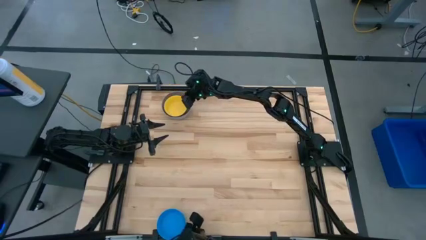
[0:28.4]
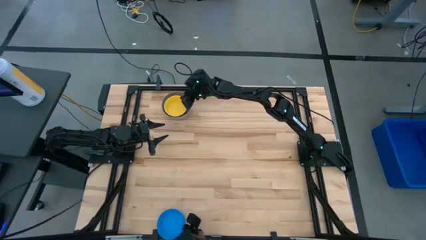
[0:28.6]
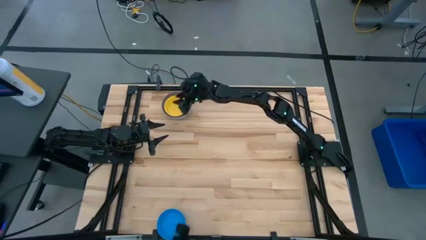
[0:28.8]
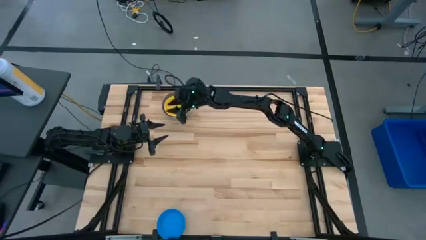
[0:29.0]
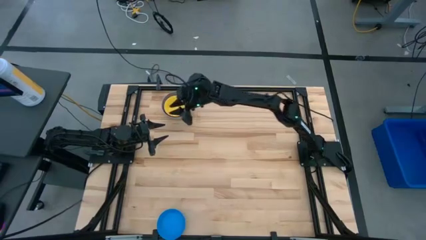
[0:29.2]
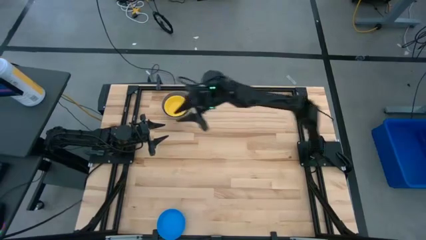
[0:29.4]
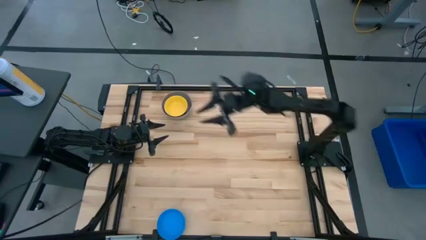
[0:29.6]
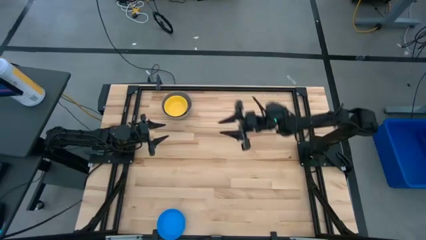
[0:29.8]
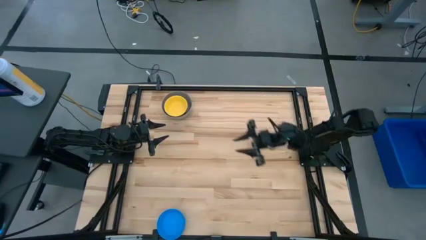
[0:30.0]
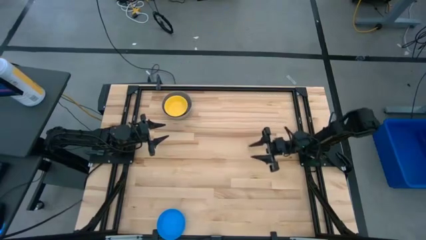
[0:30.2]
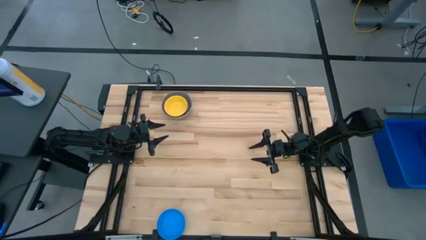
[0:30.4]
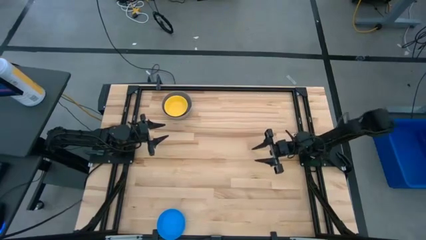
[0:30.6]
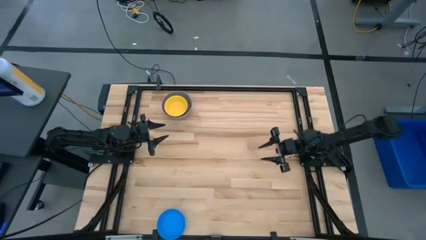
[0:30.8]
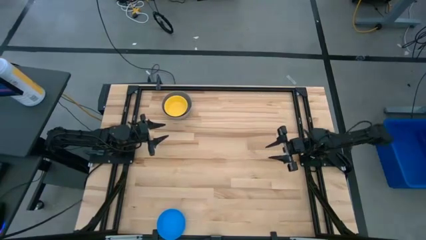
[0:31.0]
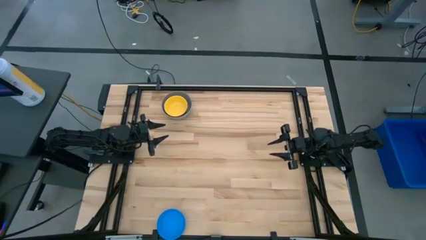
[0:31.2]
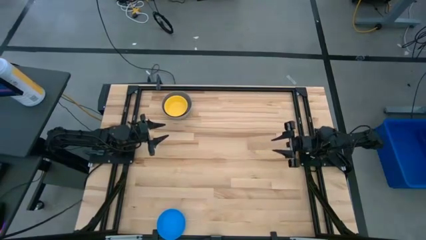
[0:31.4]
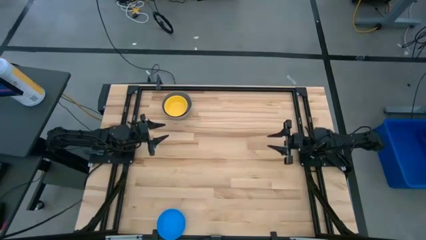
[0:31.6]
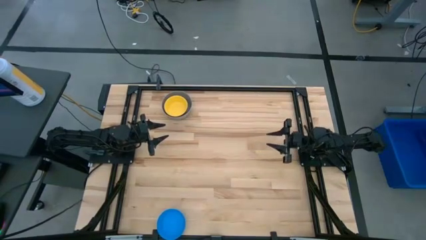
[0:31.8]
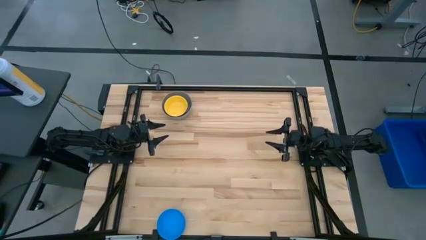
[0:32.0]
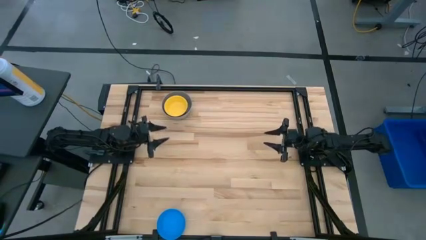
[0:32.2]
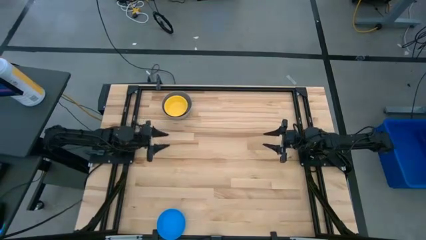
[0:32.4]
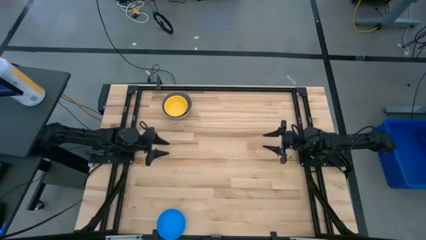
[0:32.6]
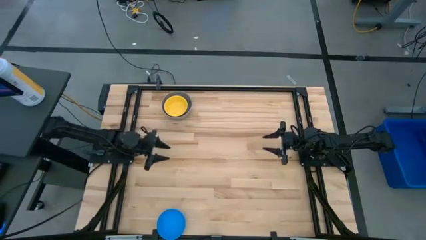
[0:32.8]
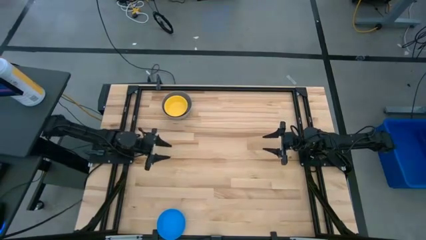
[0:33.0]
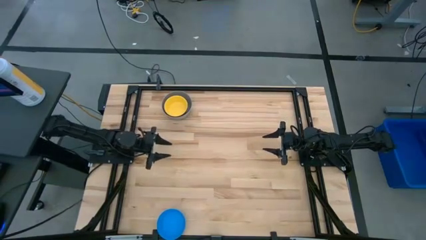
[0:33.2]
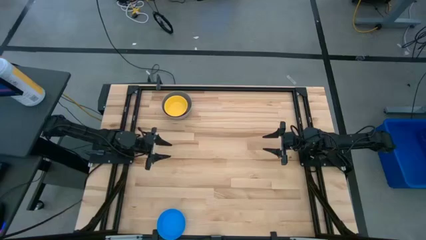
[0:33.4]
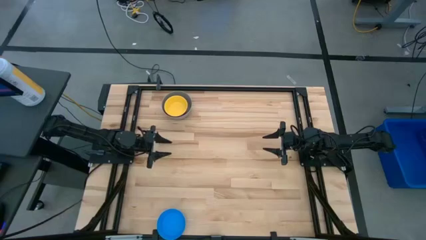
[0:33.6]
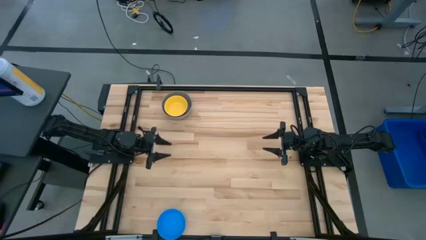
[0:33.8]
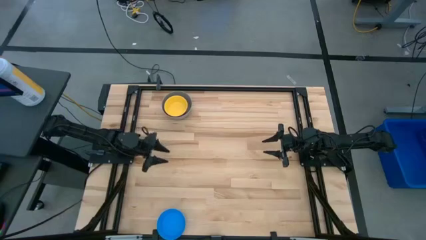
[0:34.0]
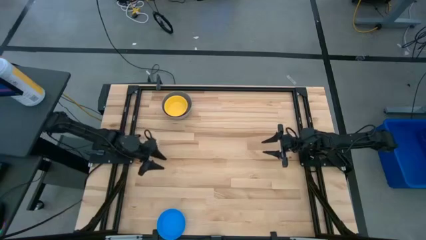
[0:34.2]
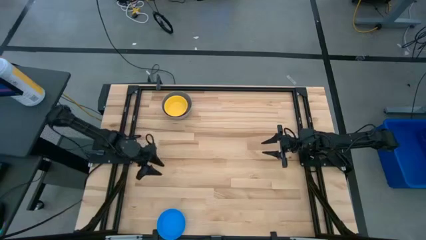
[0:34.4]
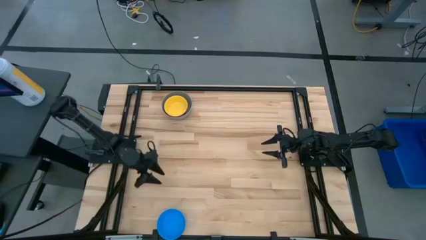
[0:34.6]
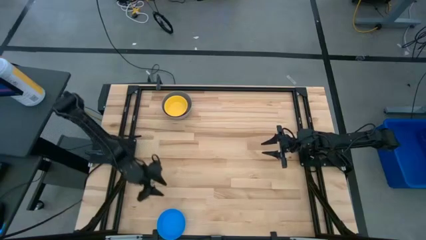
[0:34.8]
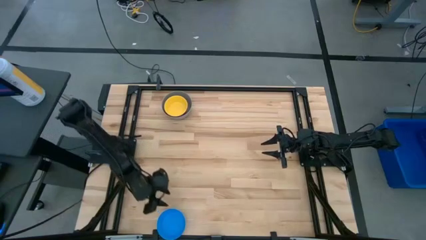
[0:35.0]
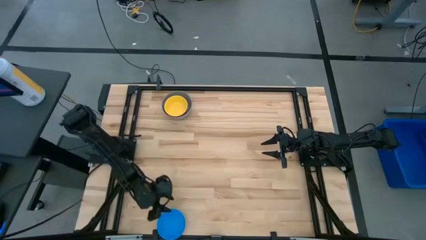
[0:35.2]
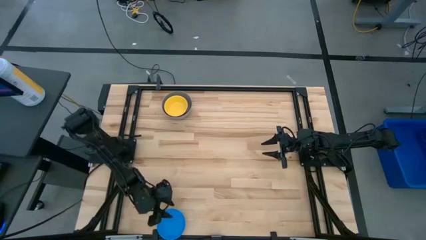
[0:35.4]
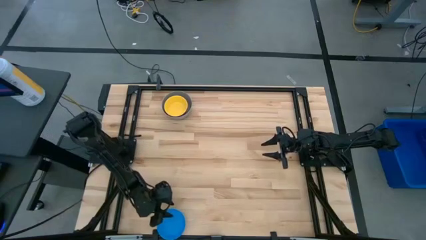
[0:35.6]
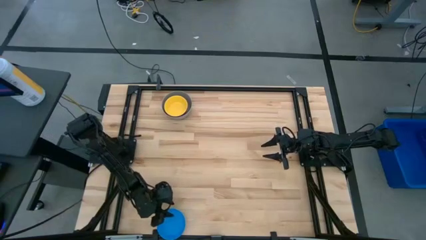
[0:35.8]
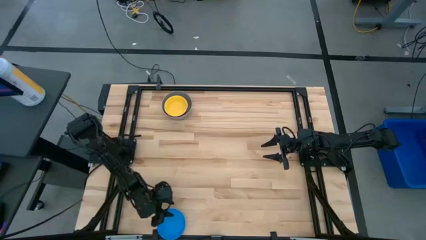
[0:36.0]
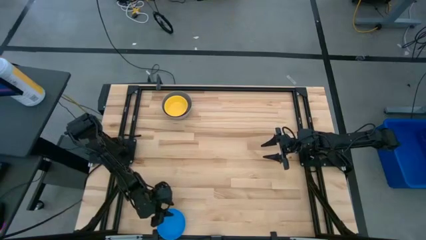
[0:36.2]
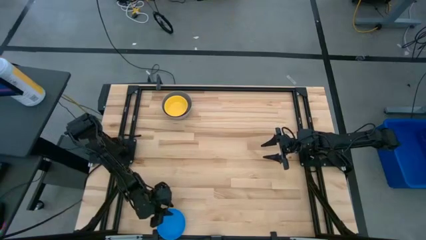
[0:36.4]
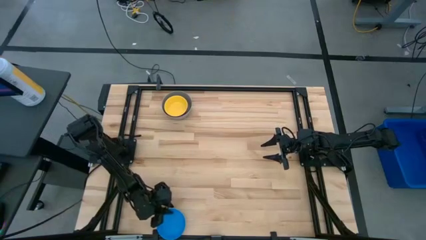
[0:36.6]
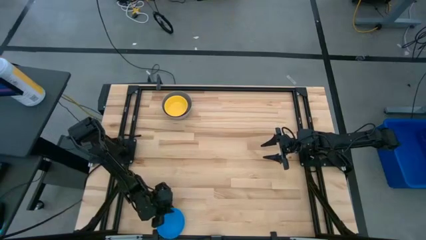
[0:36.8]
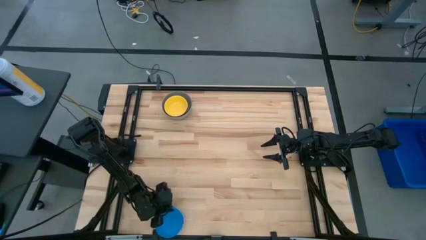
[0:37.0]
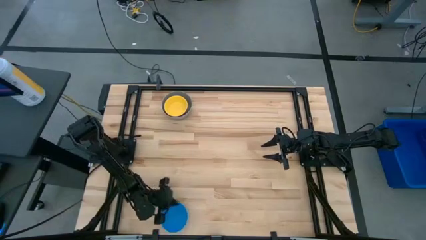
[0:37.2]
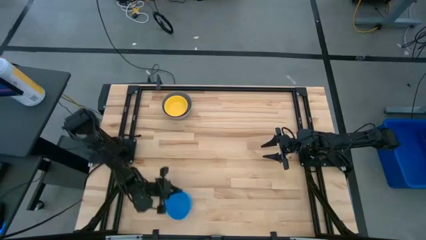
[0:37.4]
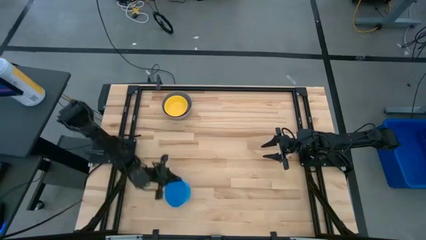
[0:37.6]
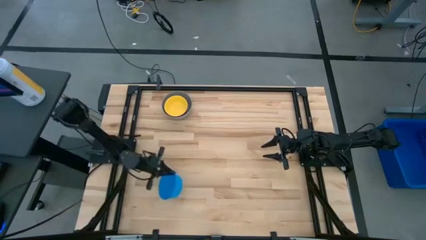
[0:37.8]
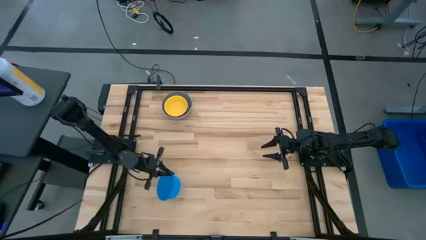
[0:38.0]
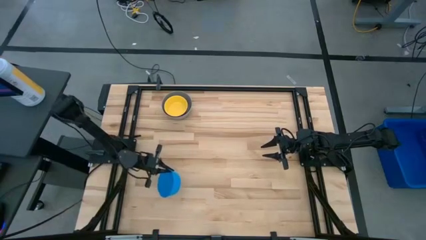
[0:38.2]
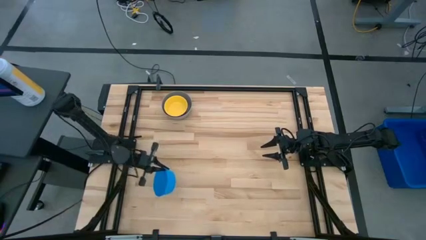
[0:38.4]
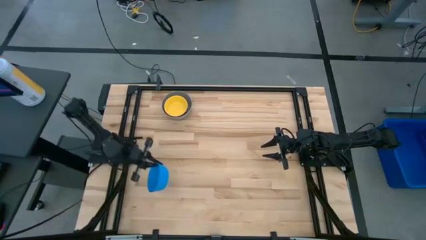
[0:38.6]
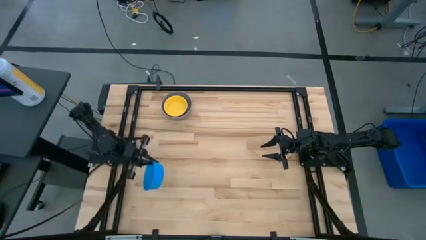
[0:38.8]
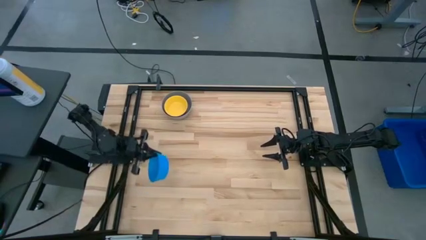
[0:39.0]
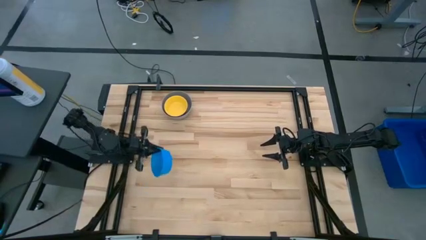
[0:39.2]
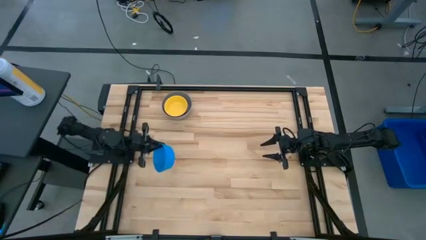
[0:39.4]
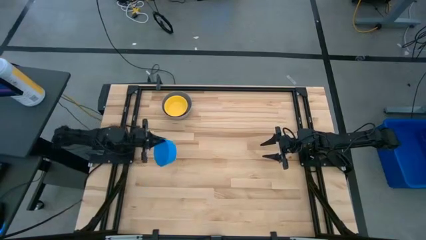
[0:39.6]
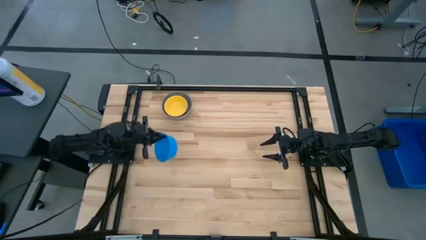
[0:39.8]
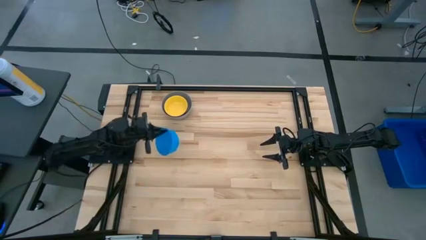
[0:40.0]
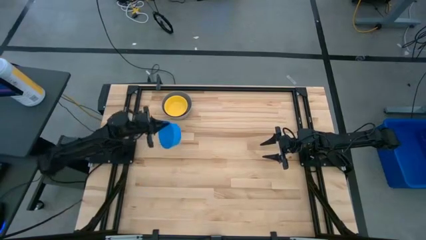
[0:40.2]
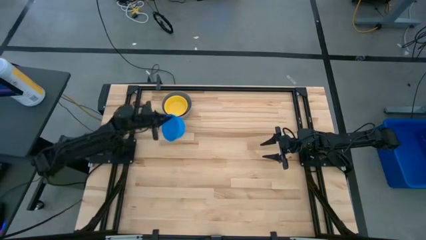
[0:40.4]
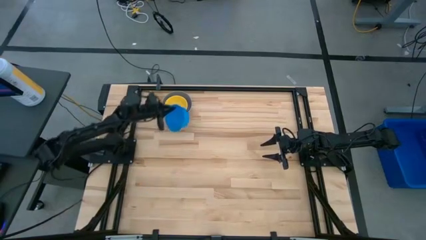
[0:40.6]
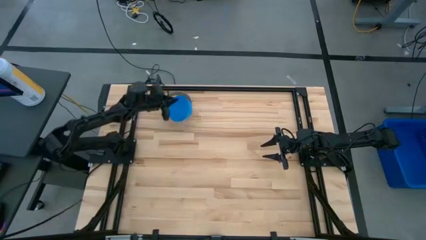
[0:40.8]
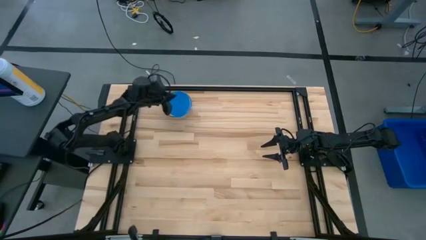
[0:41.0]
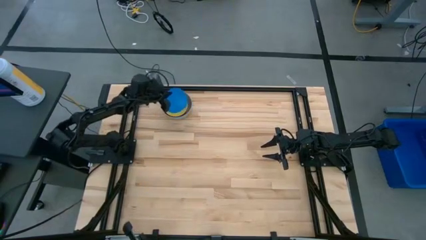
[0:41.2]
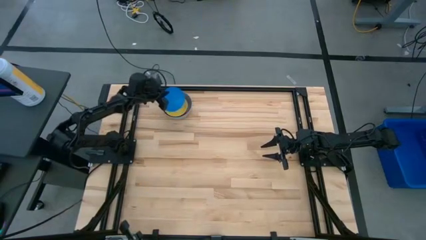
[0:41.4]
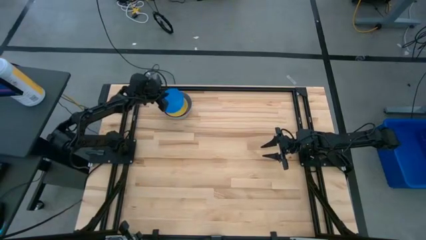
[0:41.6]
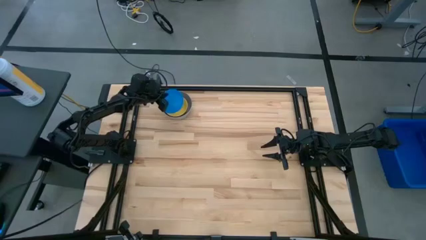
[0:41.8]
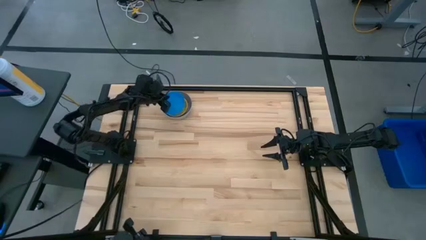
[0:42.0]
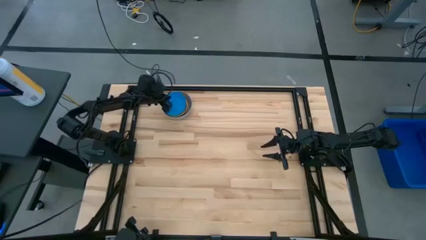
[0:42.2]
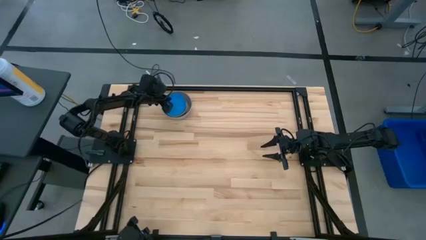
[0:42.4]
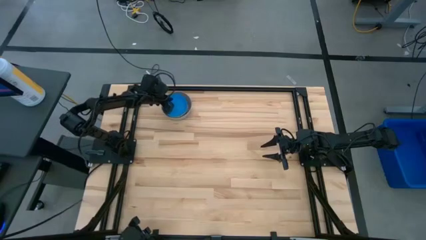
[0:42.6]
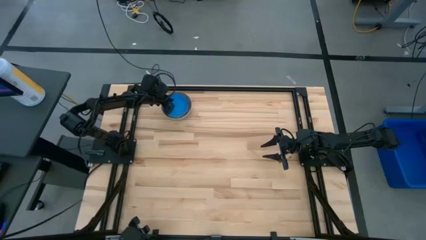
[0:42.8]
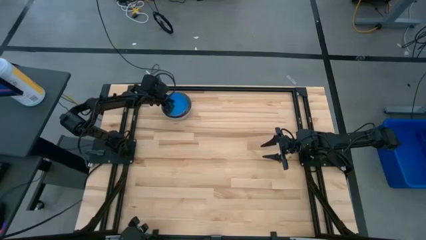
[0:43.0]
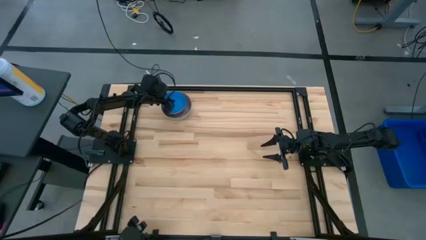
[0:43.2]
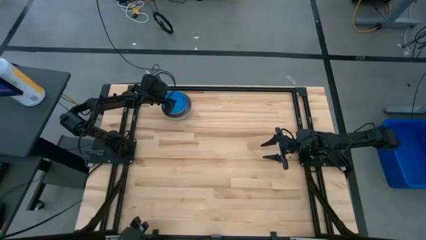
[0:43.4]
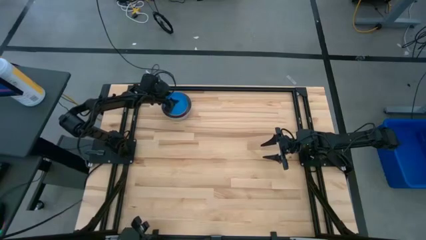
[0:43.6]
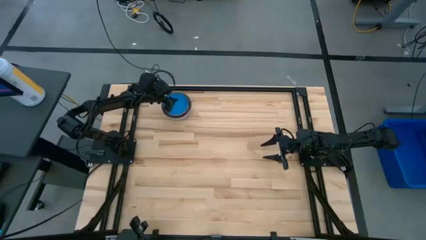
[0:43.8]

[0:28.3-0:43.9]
Stack the light blue bowl in the yellow bowl
